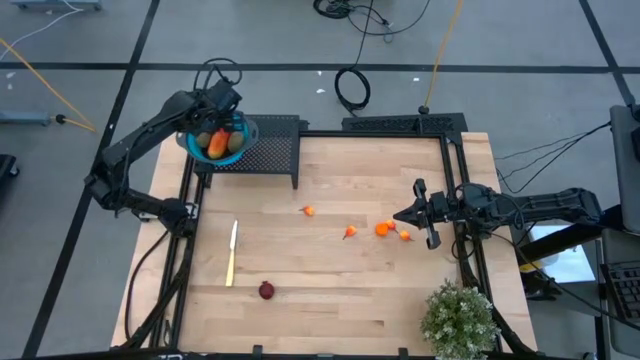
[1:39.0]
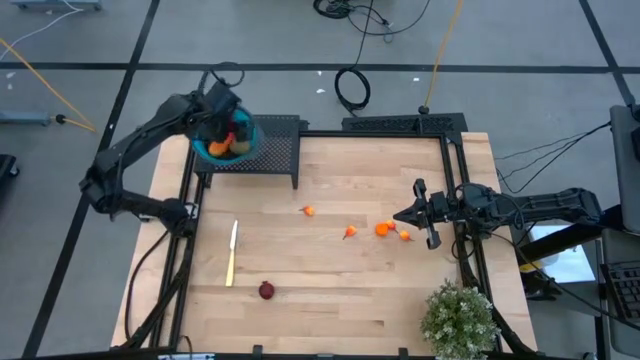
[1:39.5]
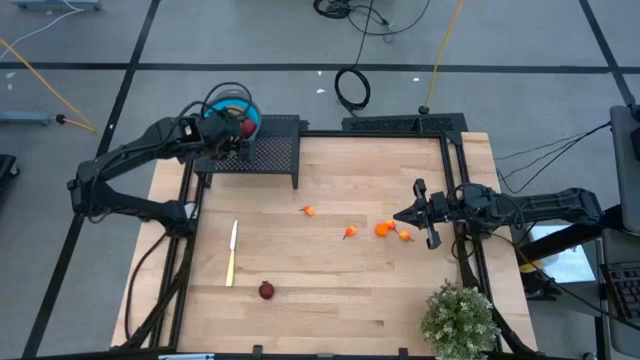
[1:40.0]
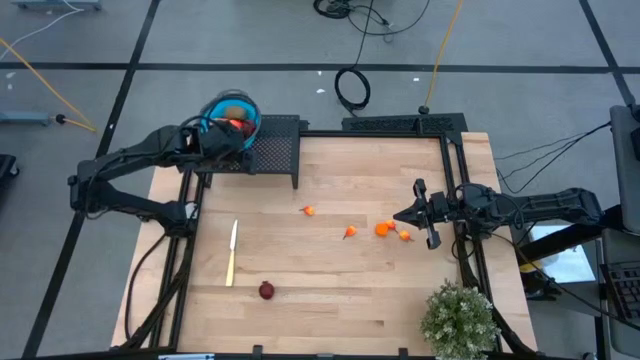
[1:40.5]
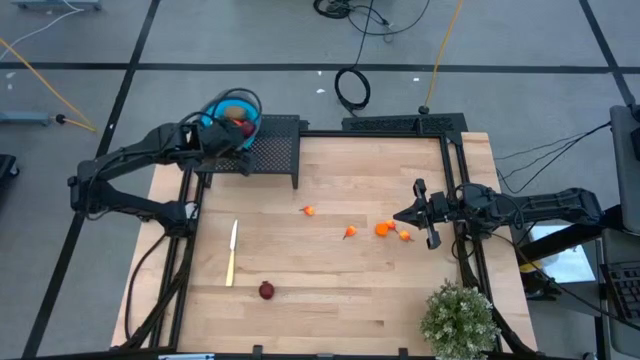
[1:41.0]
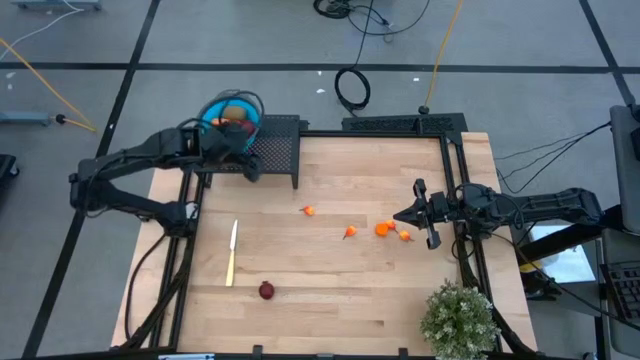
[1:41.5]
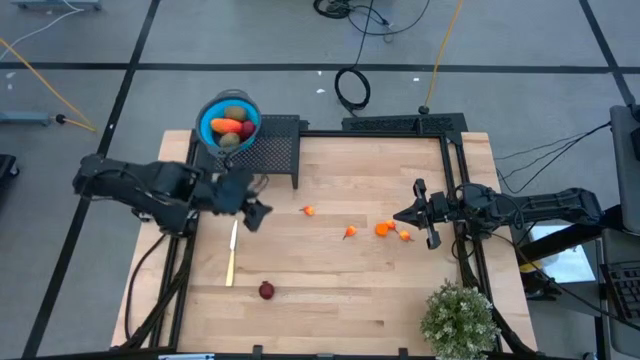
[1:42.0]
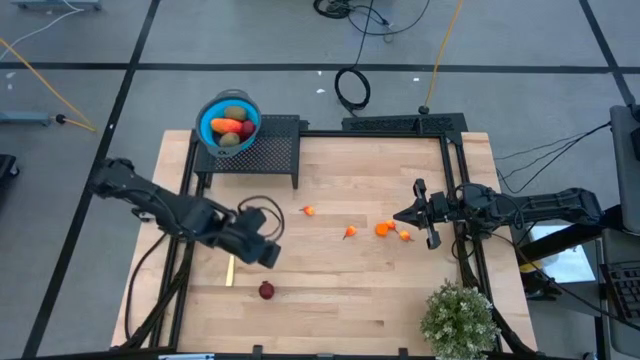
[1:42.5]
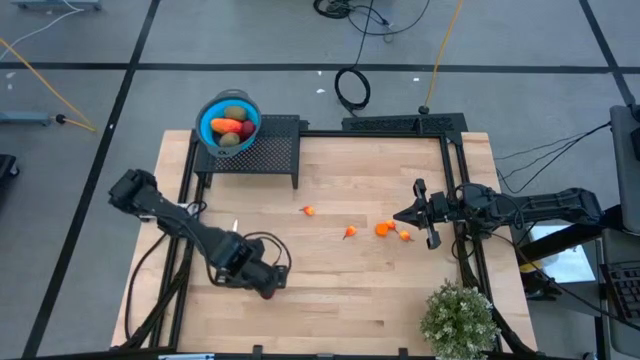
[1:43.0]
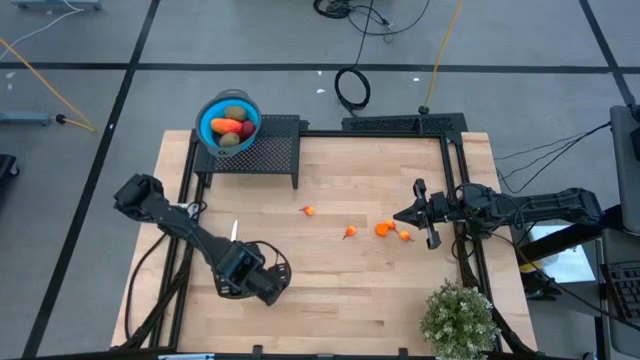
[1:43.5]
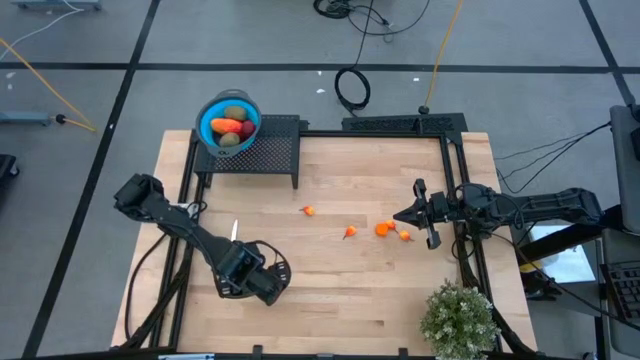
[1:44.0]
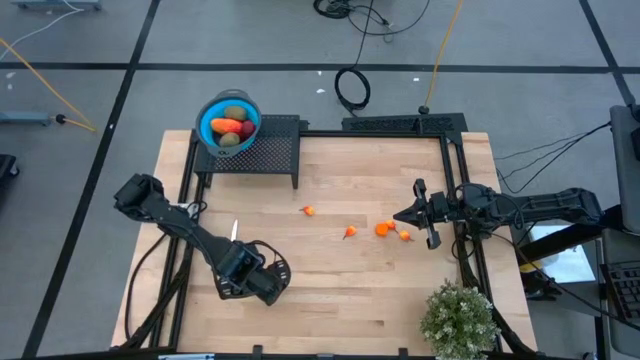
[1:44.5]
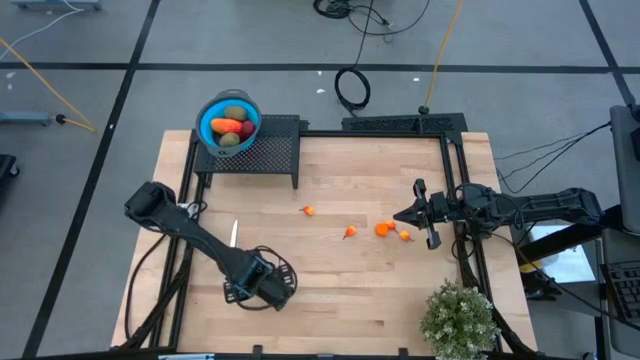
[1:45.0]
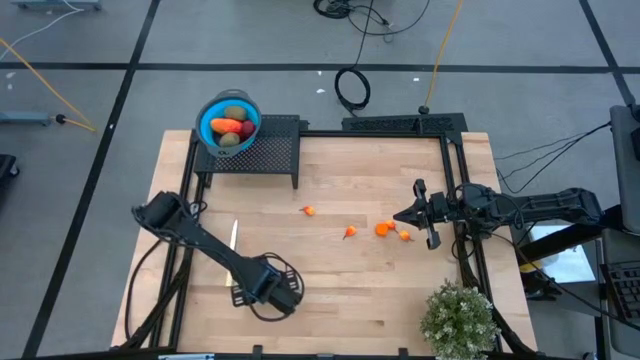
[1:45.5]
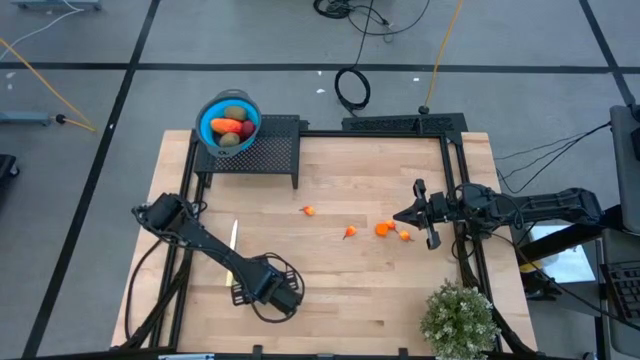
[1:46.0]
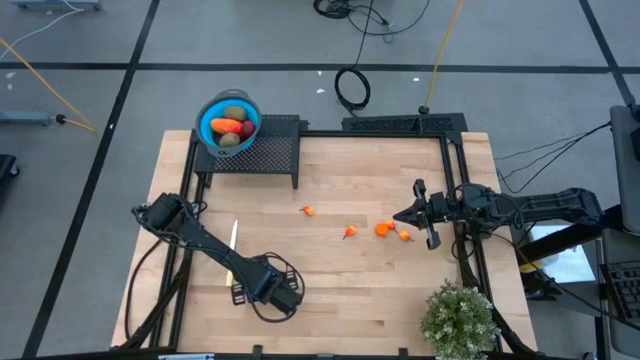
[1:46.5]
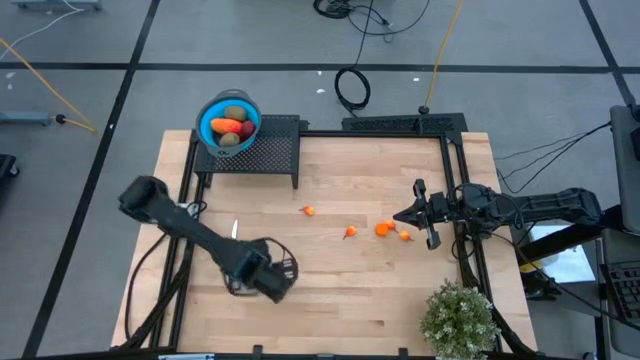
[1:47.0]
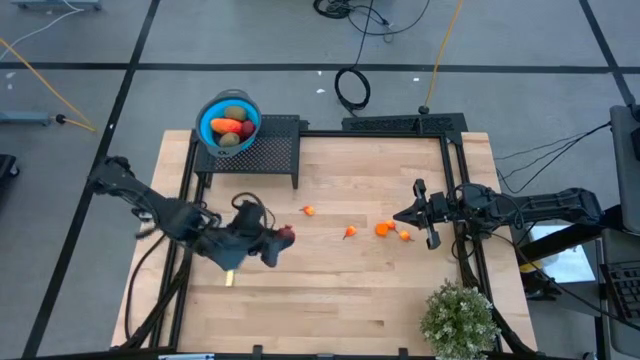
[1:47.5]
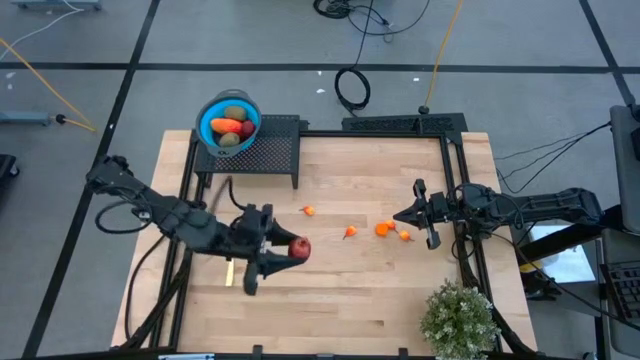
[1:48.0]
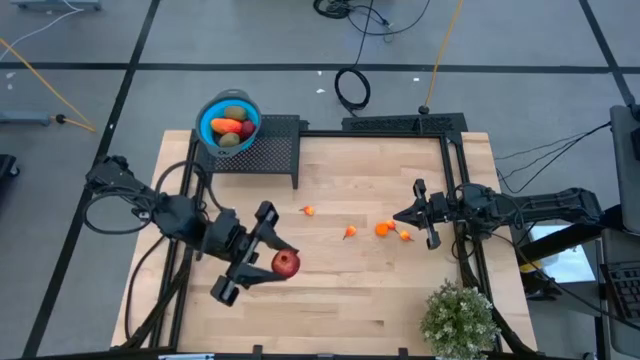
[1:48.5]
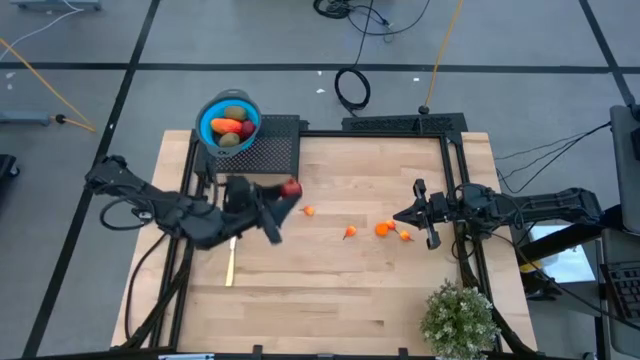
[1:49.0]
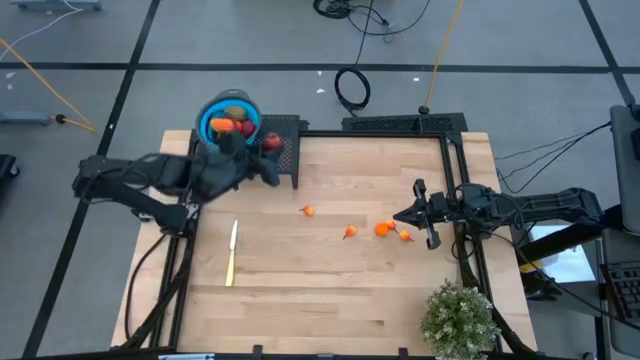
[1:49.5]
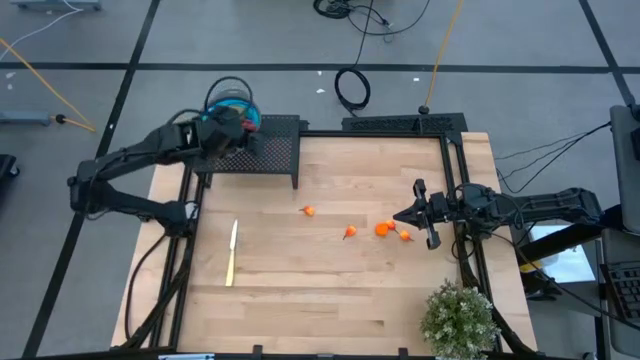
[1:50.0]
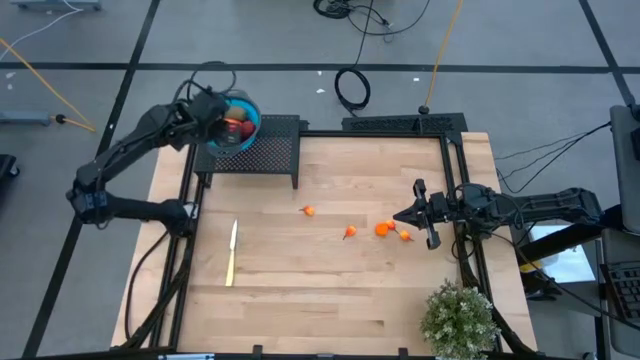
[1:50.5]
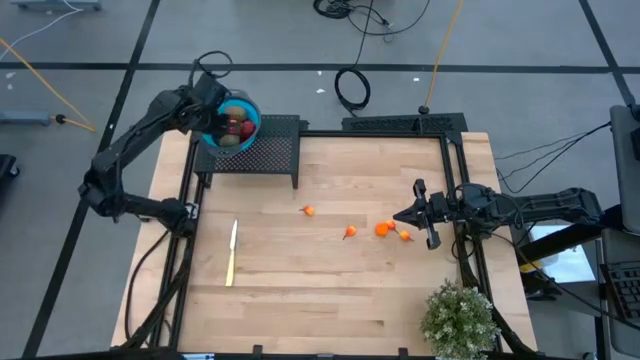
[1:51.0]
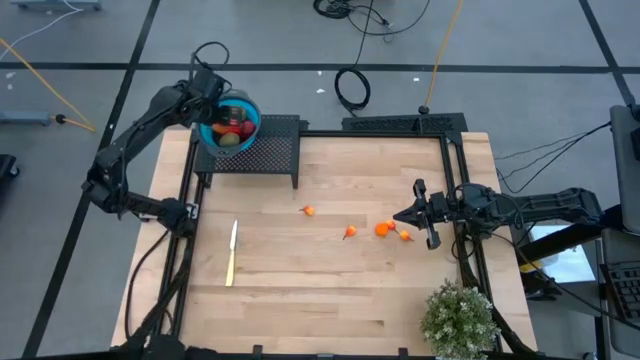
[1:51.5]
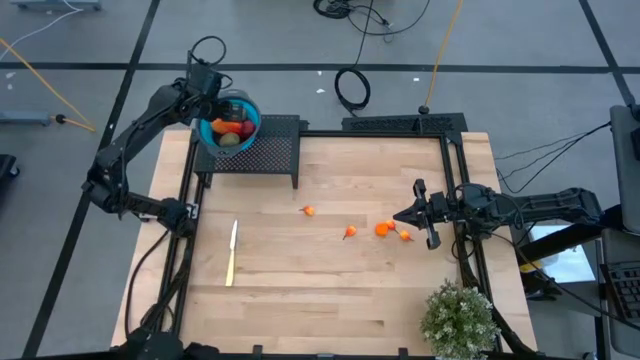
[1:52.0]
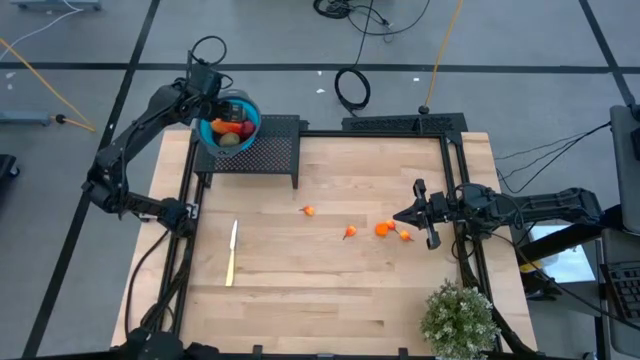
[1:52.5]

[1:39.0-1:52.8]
Task: Pick & Place Fruit
Put the pomegranate into the blue strainer bowl on the shelf
